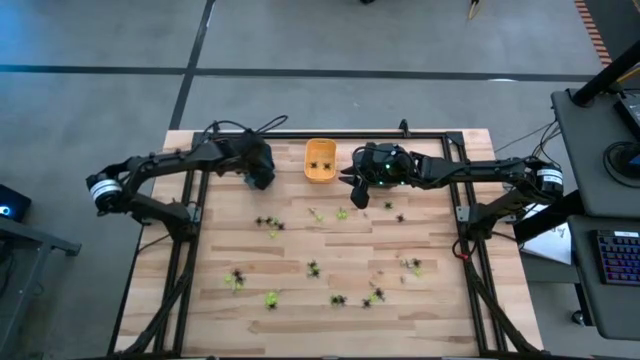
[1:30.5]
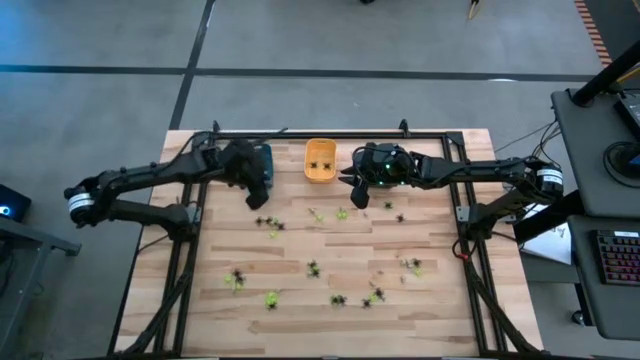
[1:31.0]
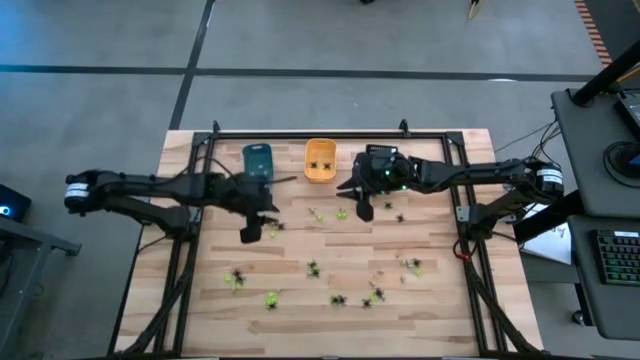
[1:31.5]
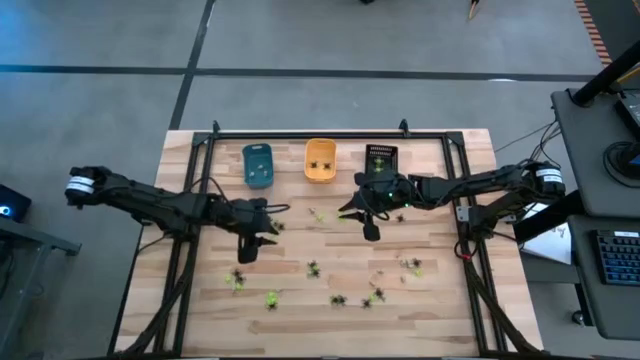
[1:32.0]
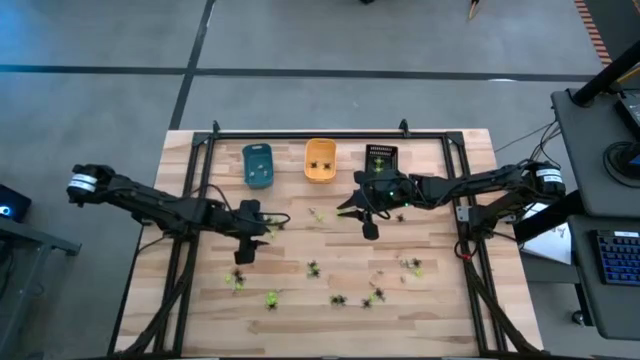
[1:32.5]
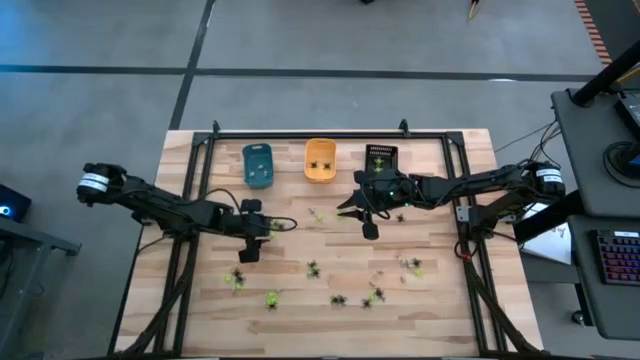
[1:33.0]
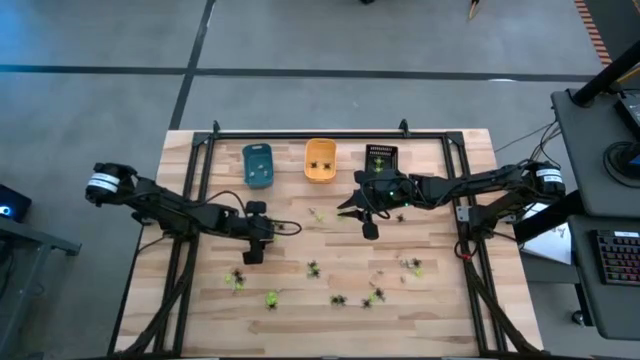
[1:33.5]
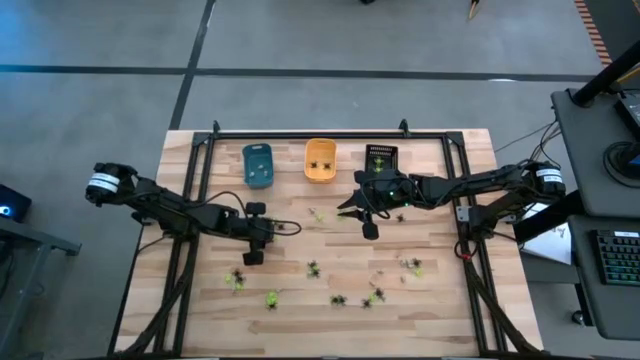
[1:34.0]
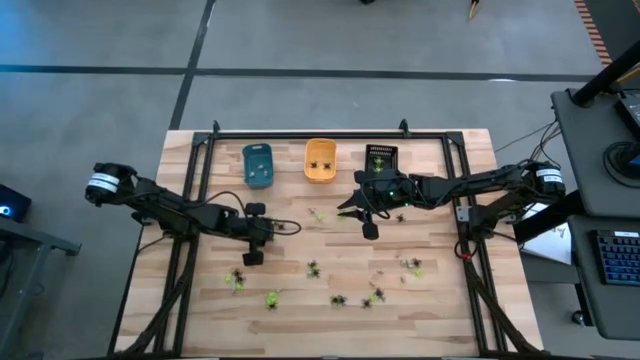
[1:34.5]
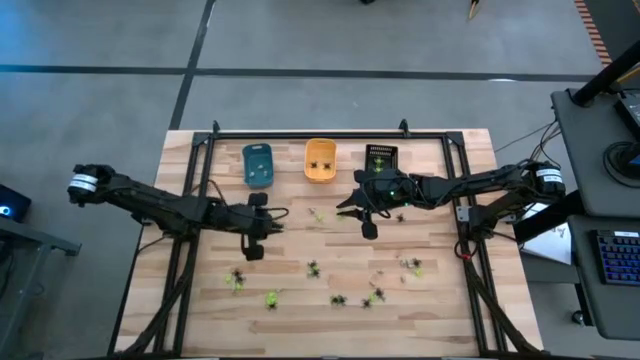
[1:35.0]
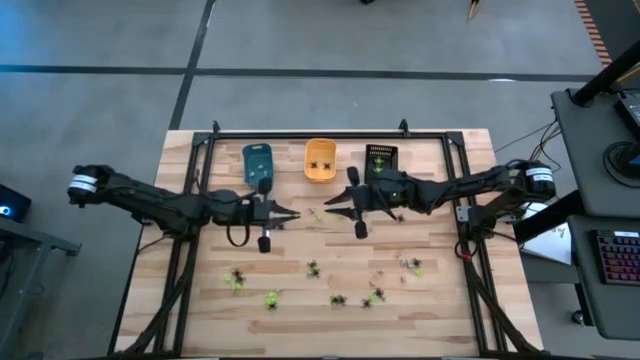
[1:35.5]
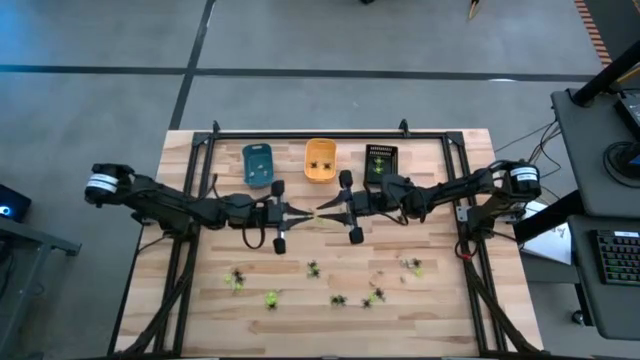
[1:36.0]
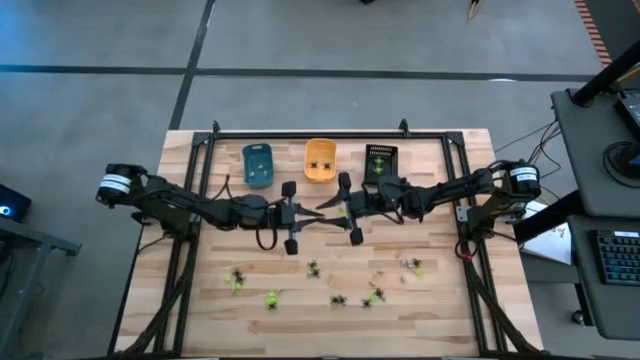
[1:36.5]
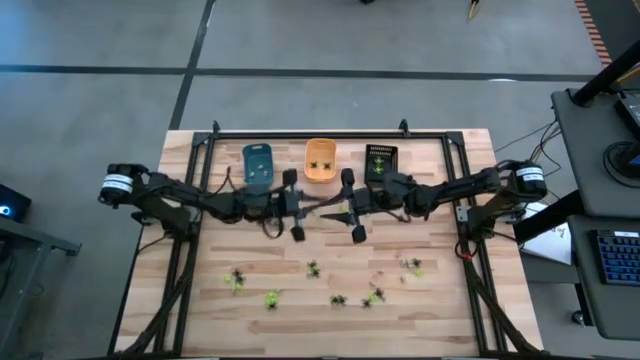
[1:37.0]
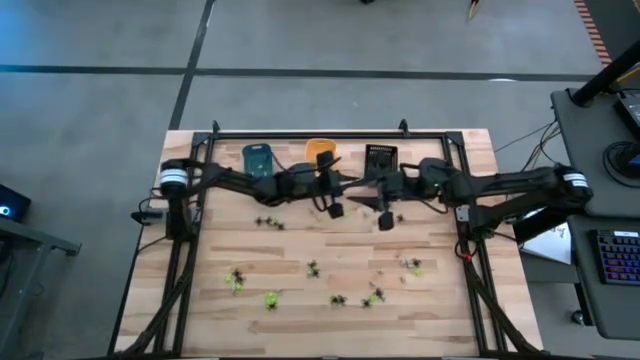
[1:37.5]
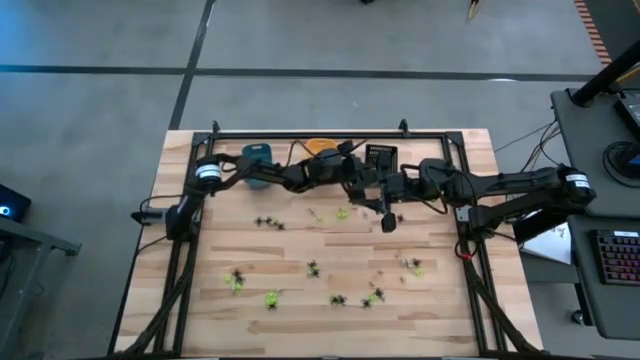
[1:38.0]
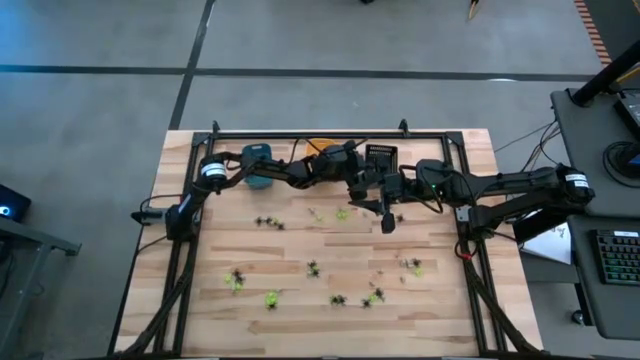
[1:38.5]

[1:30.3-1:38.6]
Task: Sort Halloween decoration
Put the green spider toy into the black bin

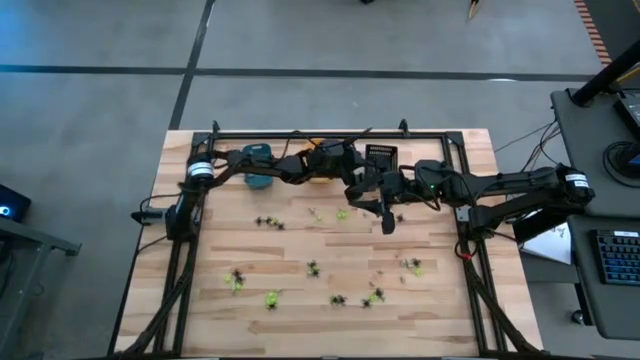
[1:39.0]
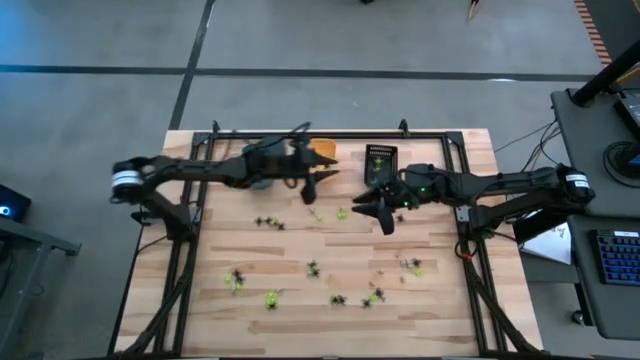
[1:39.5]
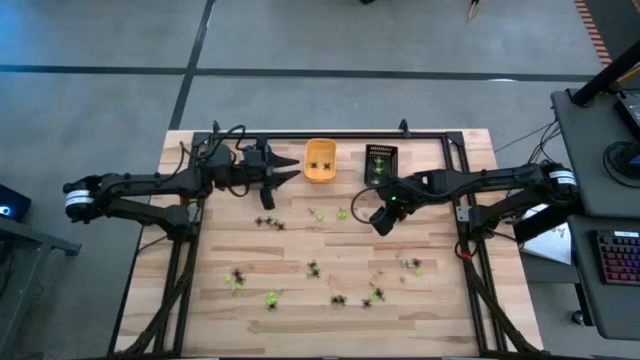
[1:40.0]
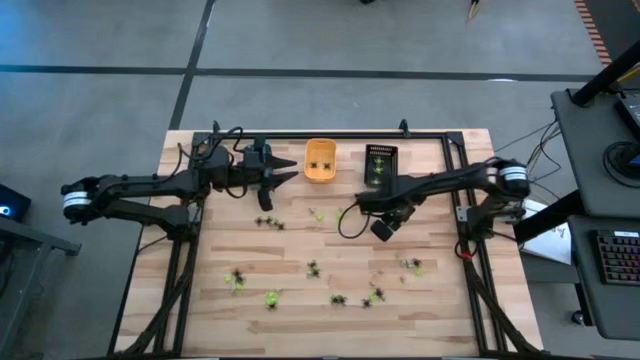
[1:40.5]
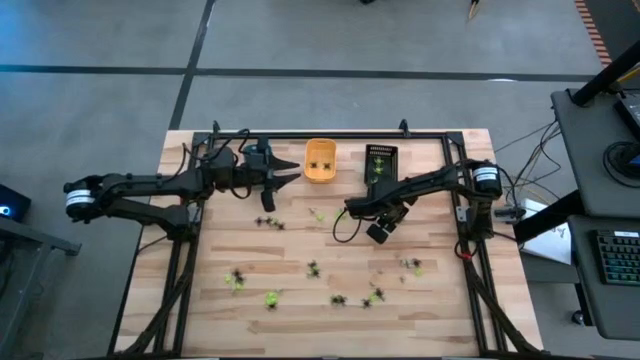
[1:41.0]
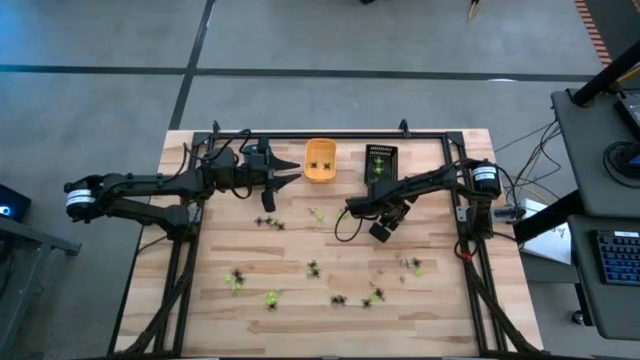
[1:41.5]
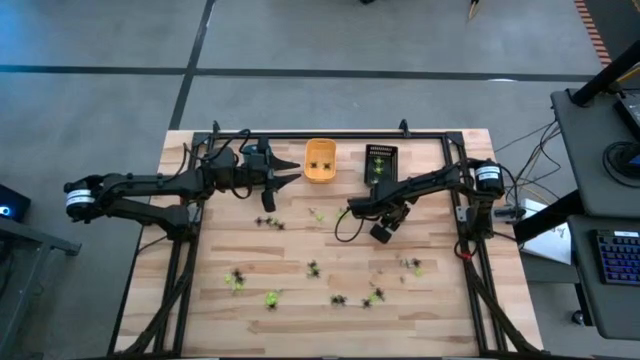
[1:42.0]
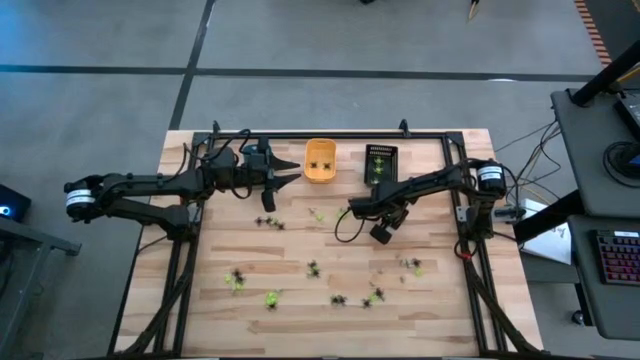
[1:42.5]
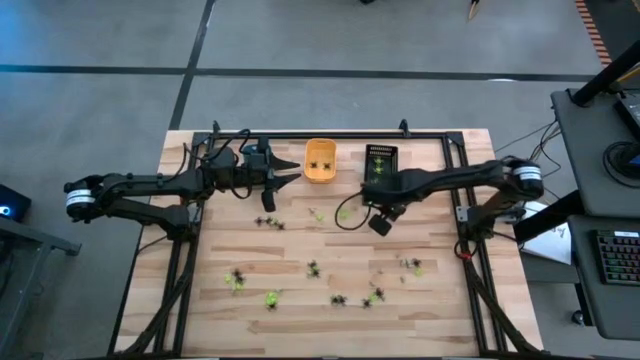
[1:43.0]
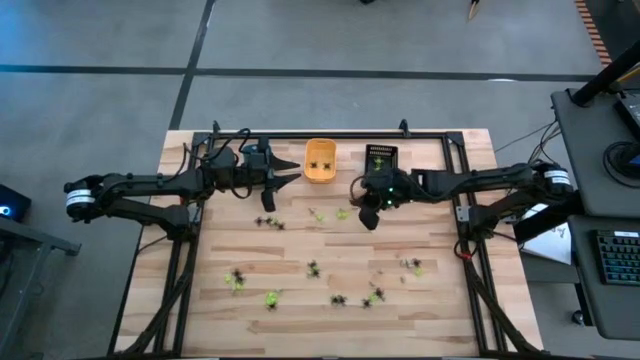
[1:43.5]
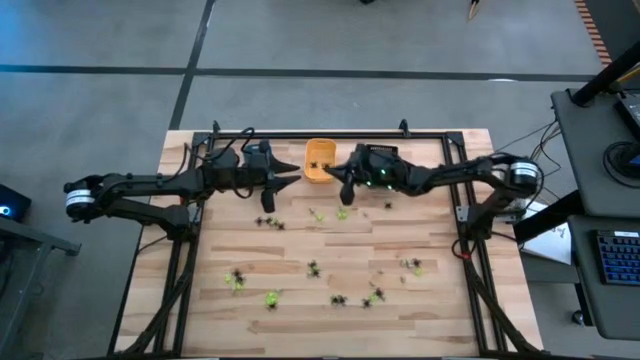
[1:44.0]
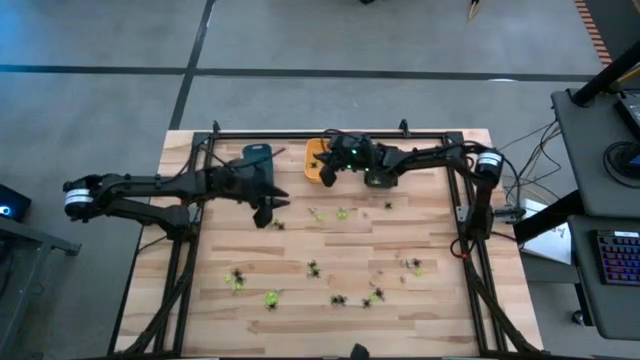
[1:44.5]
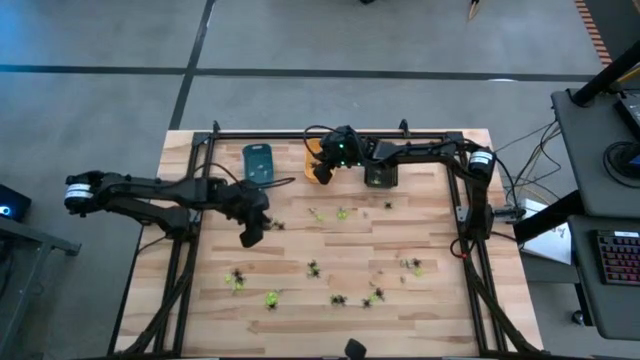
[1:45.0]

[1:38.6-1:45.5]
Put the black spider toy into the orange bin

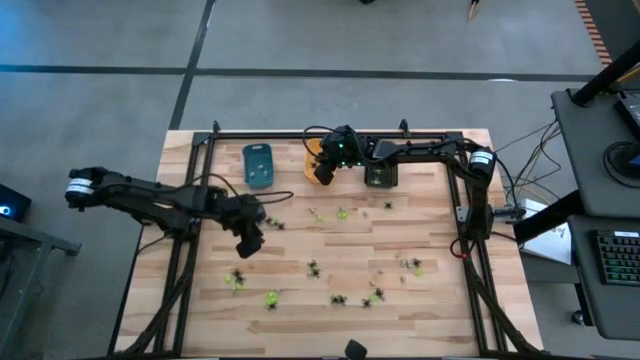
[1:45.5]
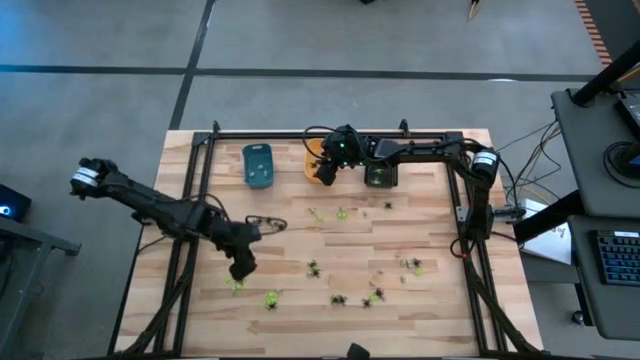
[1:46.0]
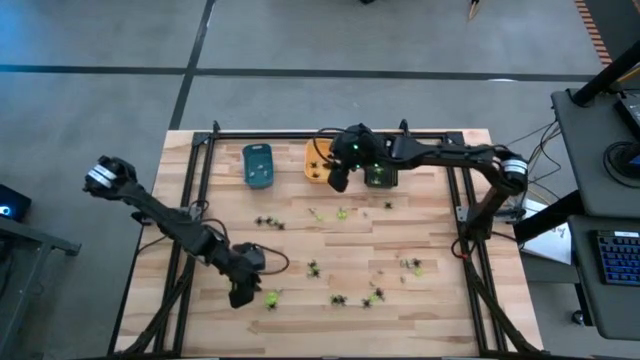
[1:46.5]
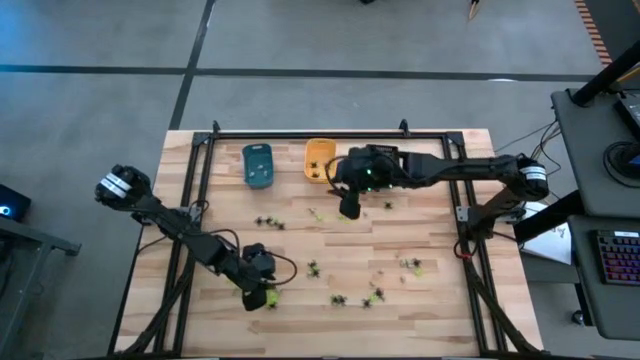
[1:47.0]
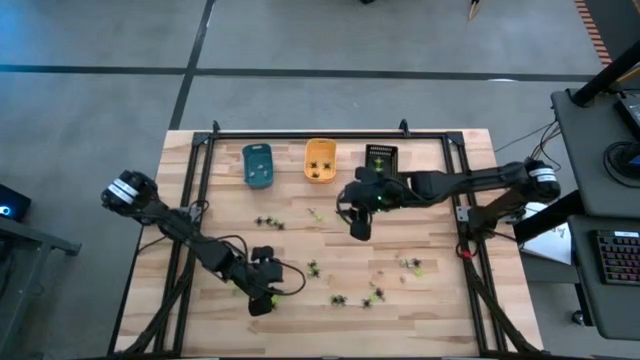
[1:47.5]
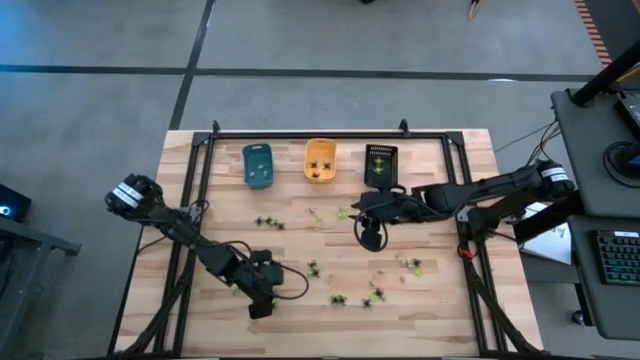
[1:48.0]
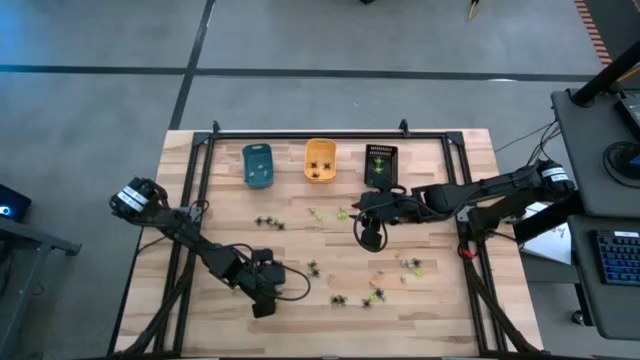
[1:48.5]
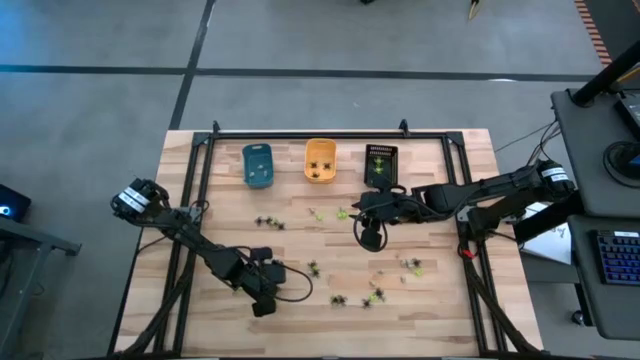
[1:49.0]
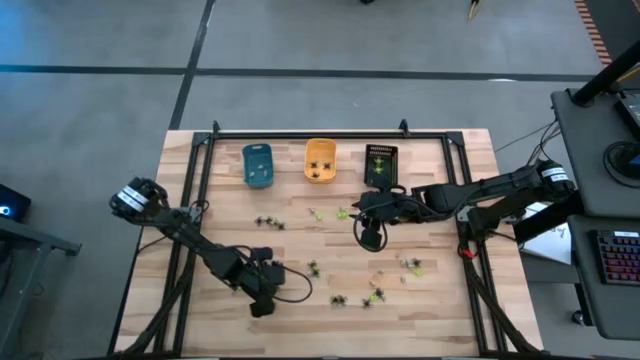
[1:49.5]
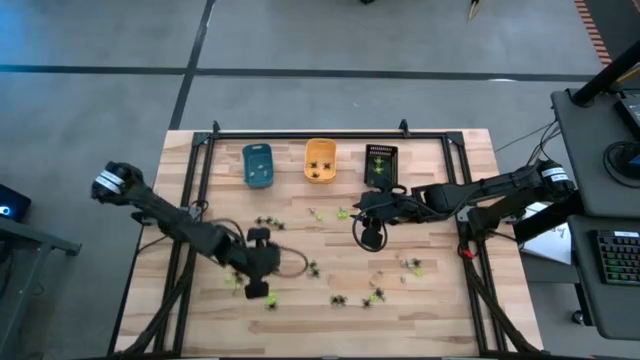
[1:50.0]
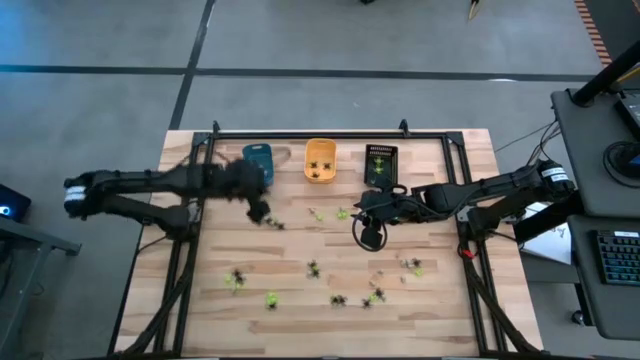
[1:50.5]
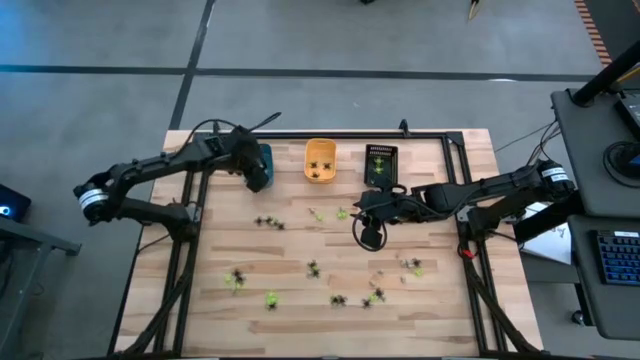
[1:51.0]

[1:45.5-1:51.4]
Put the white skull toy into the blue bin
